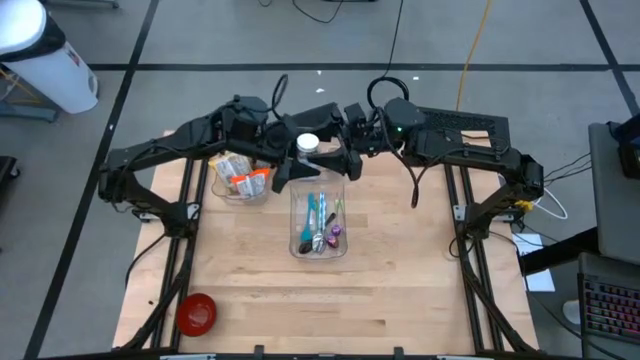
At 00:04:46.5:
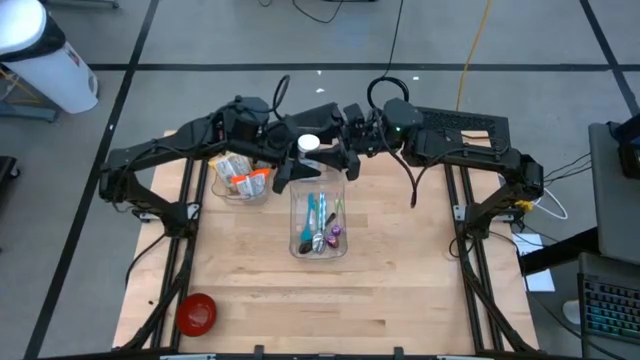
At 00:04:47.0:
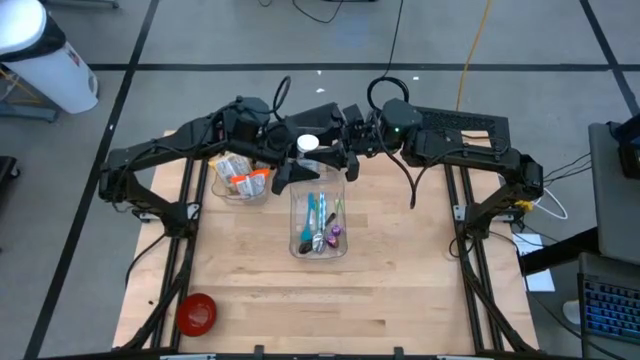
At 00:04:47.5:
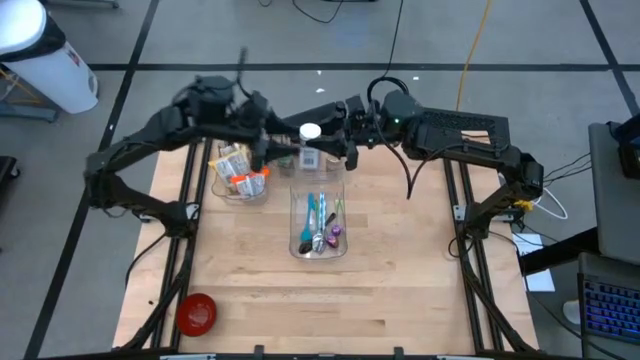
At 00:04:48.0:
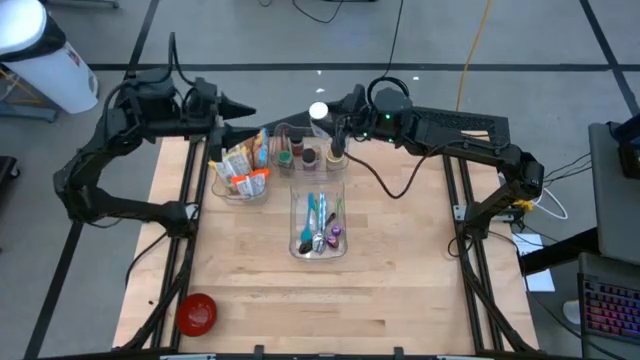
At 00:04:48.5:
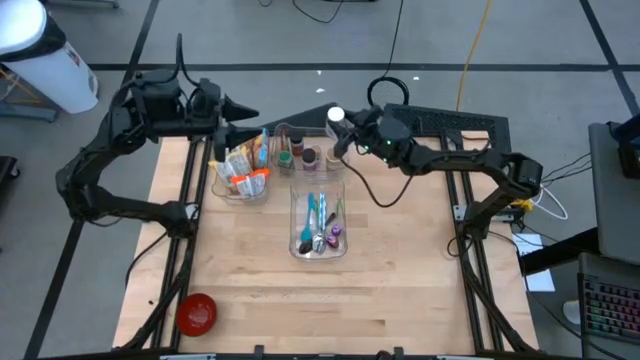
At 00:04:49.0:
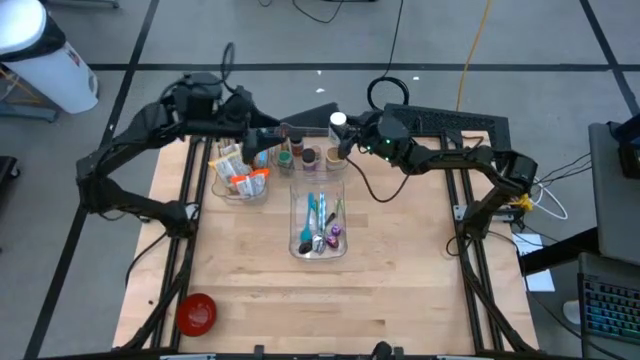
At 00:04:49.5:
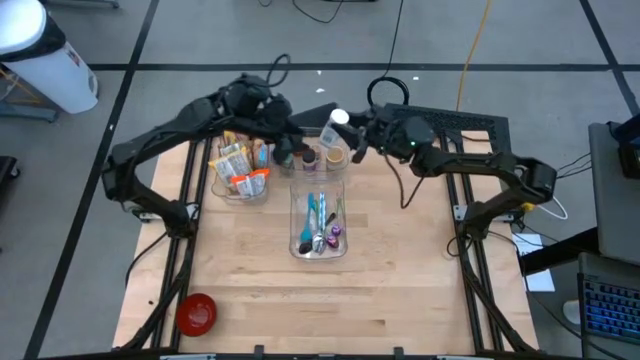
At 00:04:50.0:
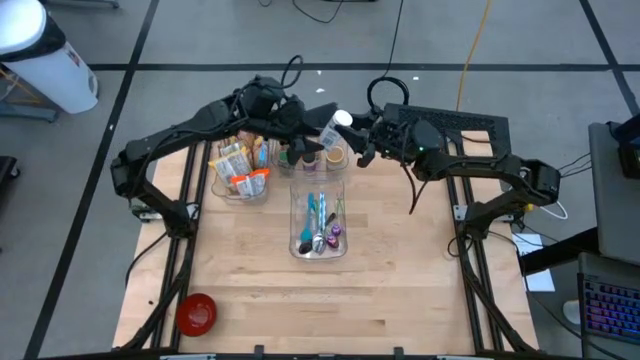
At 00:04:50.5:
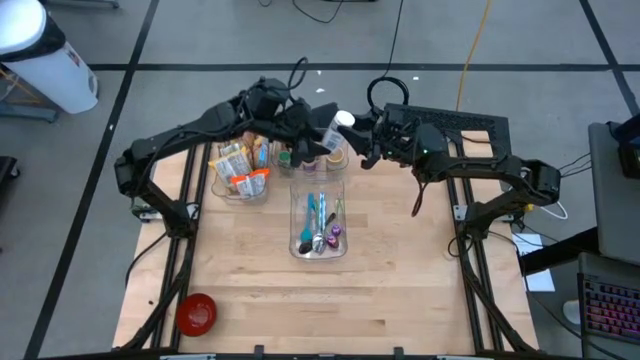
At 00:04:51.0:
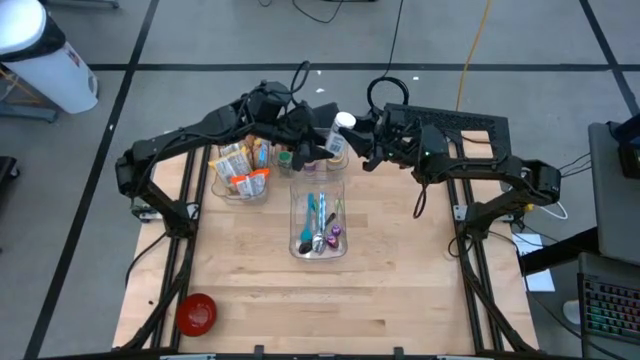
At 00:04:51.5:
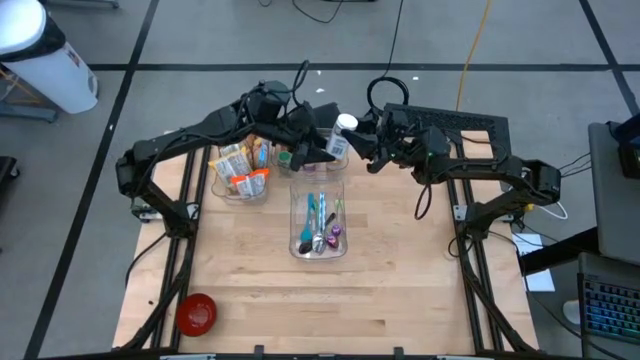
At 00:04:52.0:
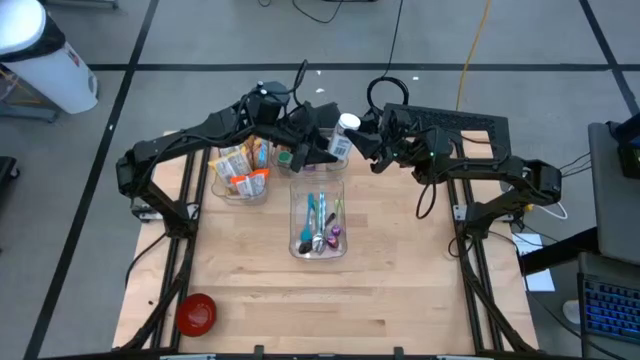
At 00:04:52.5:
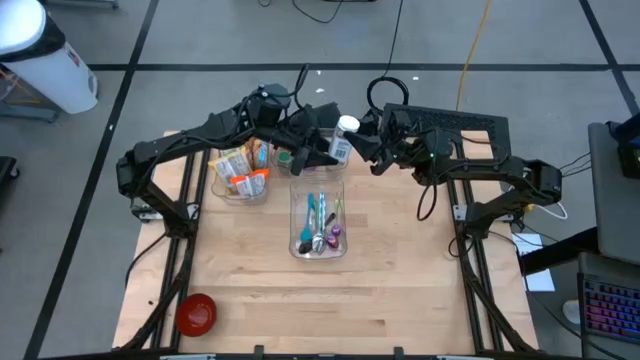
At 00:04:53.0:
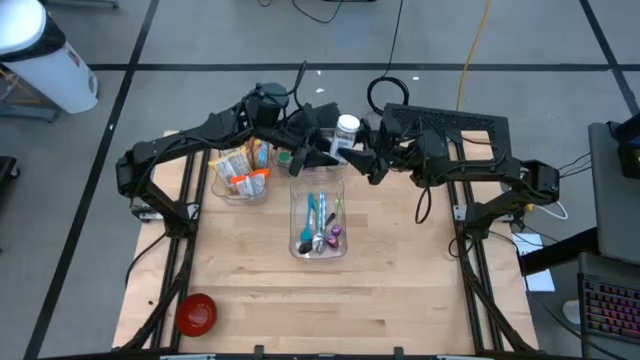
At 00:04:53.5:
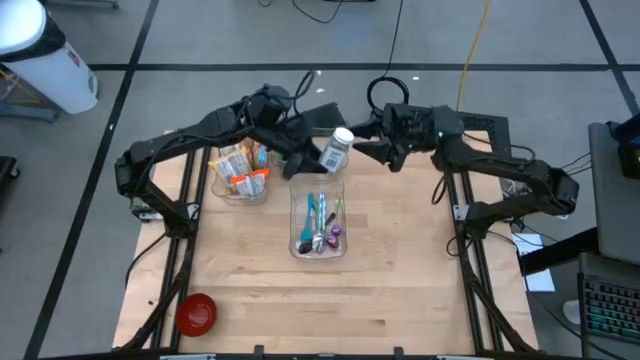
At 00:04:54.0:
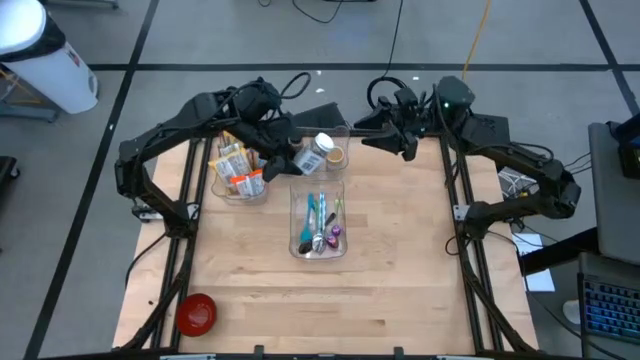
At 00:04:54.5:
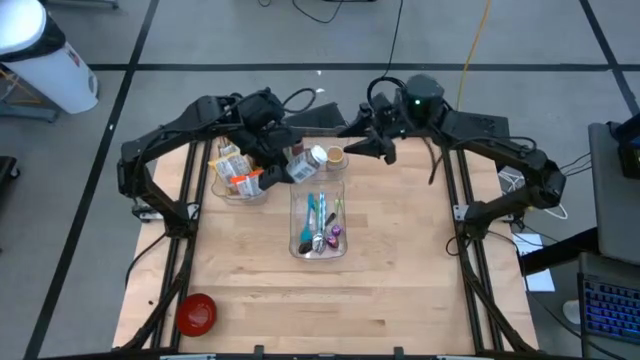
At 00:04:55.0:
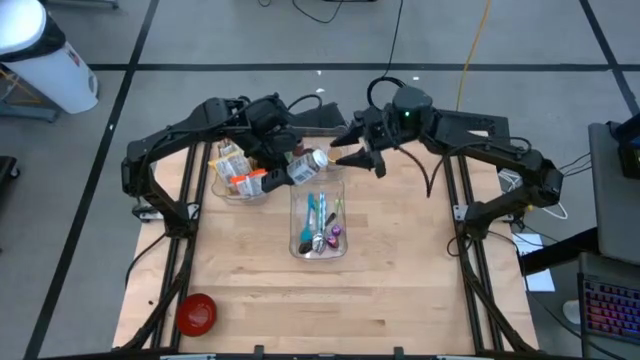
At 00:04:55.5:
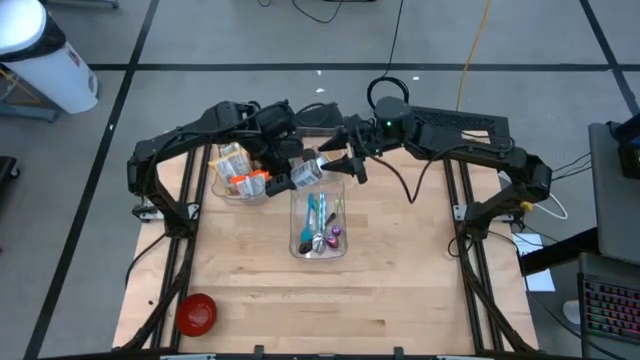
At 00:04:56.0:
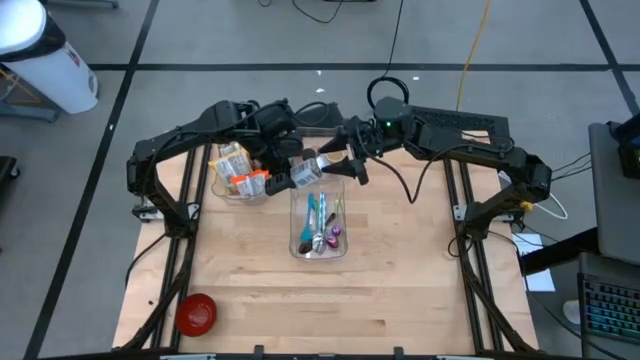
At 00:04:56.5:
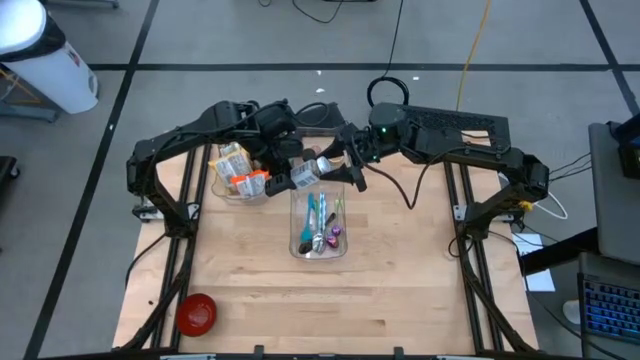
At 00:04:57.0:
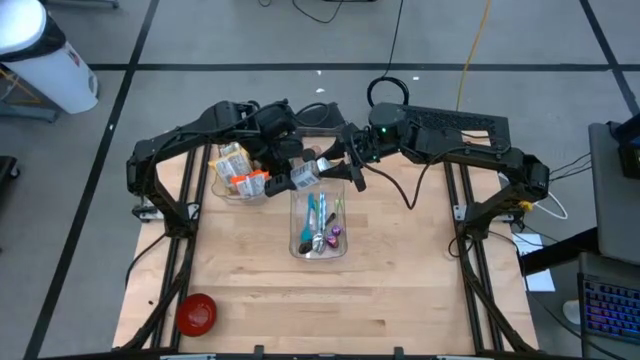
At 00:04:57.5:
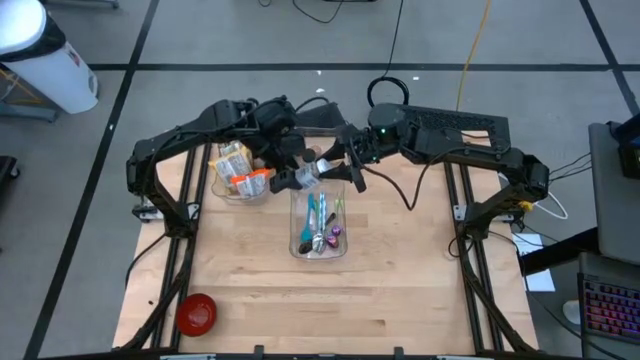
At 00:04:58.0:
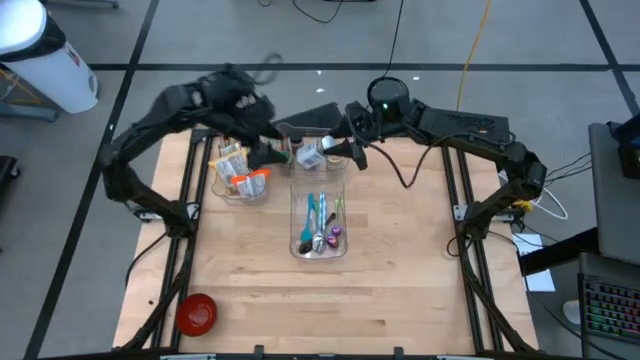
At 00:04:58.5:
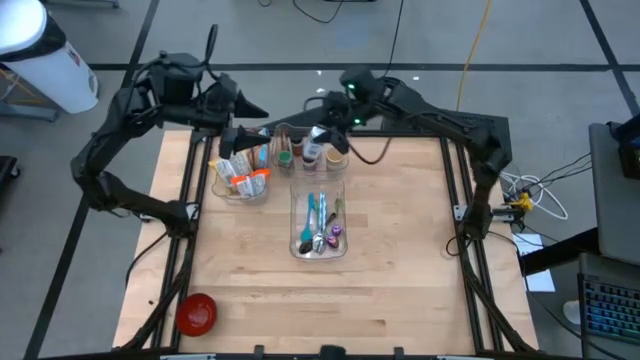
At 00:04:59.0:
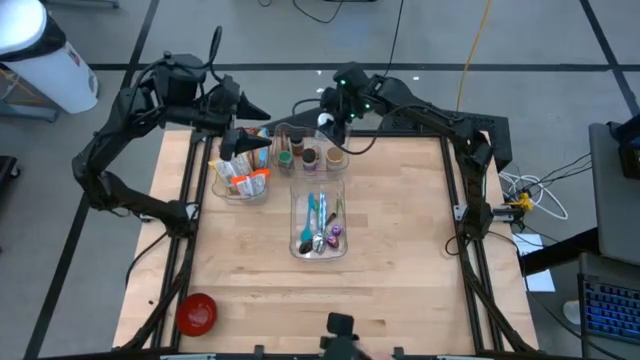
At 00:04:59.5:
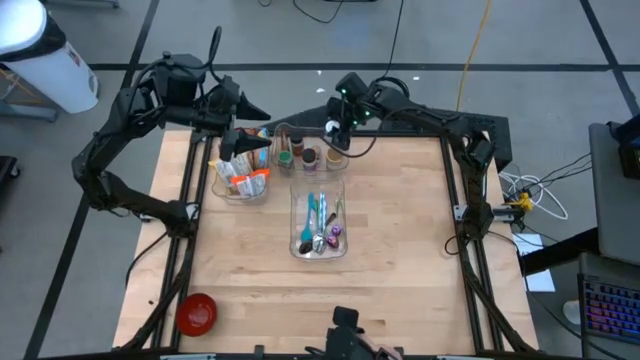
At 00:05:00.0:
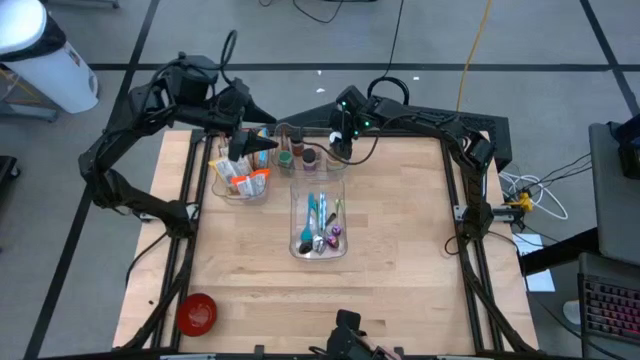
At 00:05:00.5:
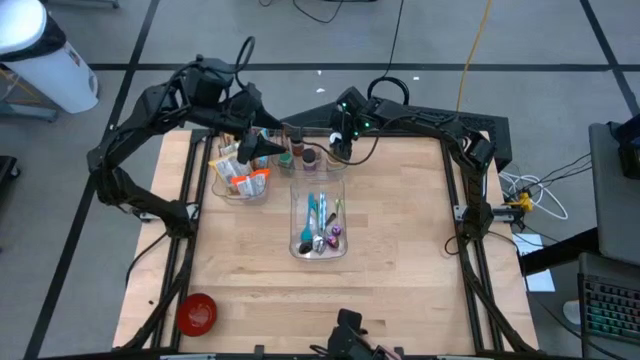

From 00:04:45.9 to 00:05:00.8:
Task: Pick & Place Food Item
Put the white seasoning bottle into the top right transparent bin

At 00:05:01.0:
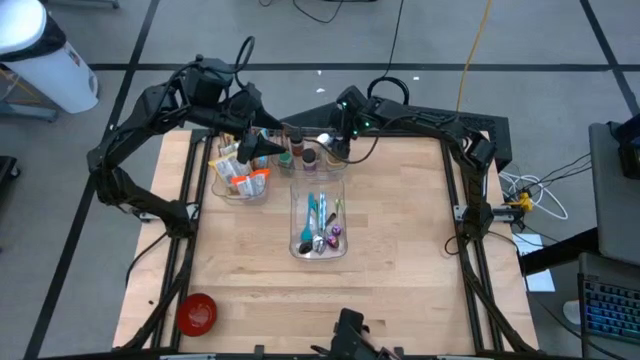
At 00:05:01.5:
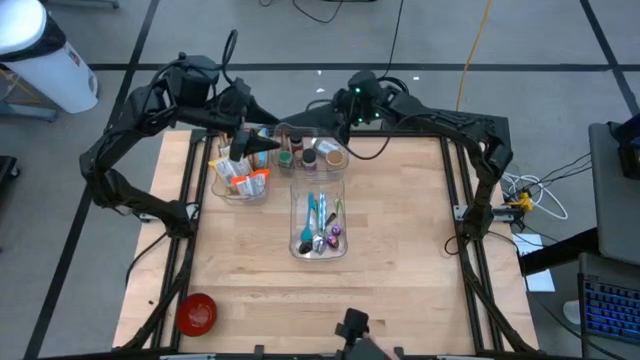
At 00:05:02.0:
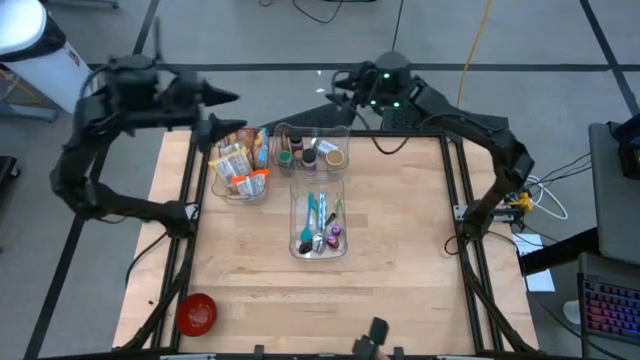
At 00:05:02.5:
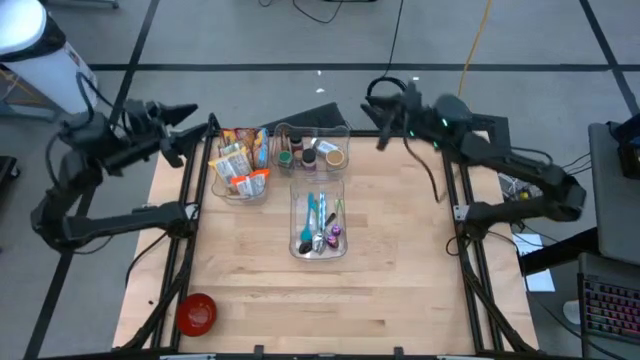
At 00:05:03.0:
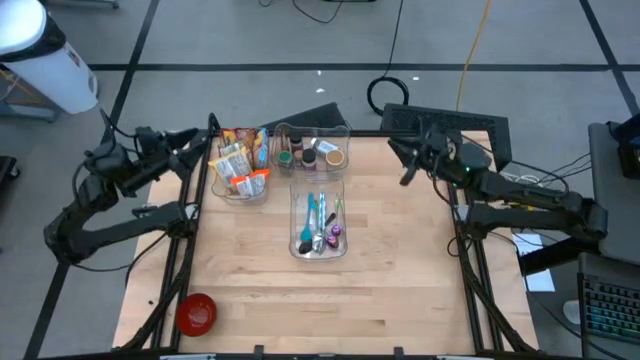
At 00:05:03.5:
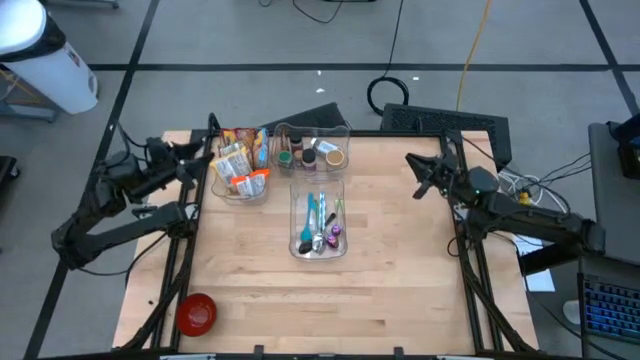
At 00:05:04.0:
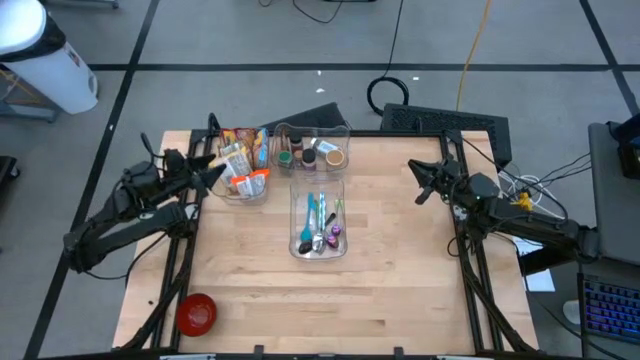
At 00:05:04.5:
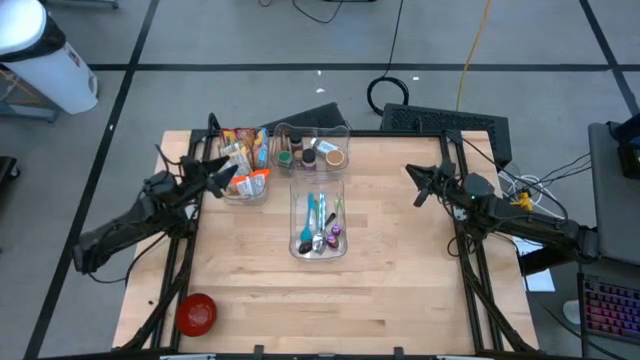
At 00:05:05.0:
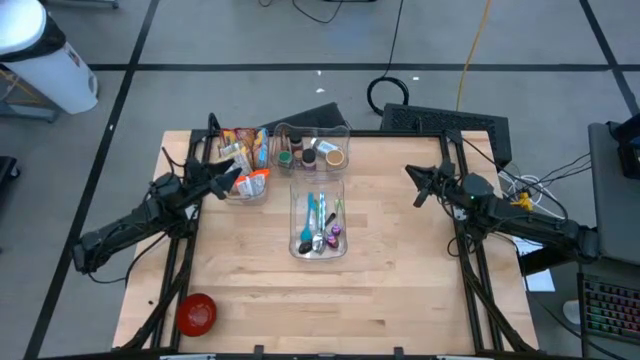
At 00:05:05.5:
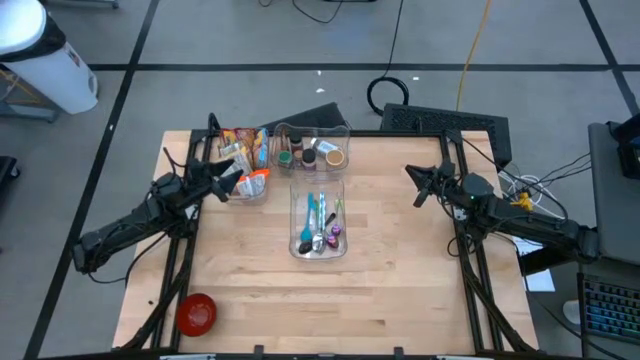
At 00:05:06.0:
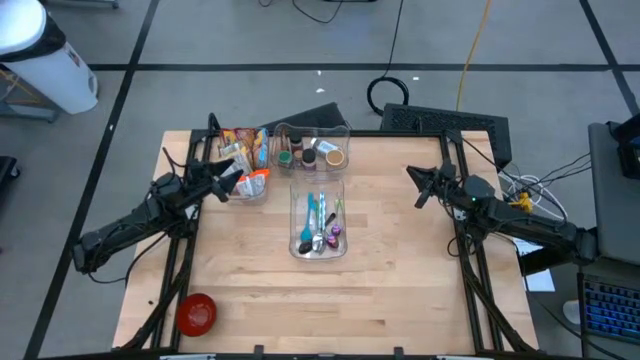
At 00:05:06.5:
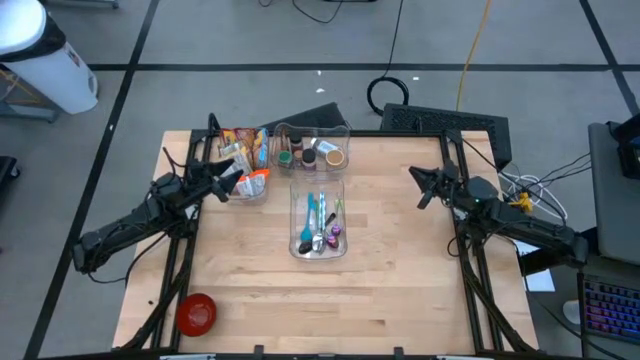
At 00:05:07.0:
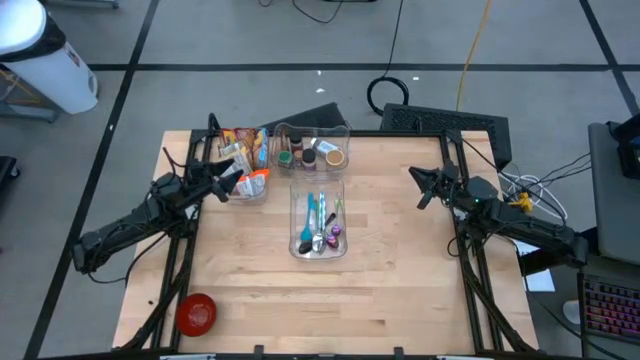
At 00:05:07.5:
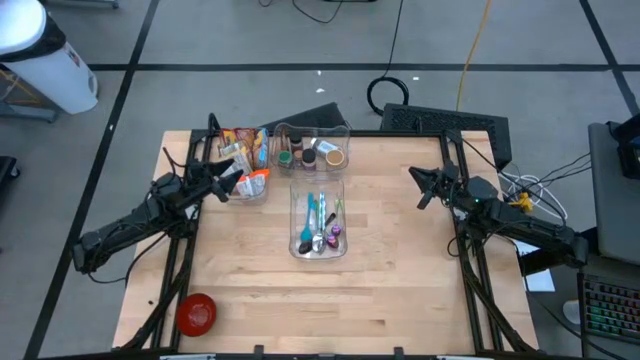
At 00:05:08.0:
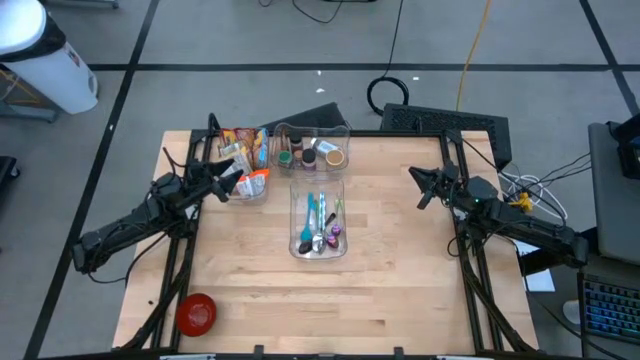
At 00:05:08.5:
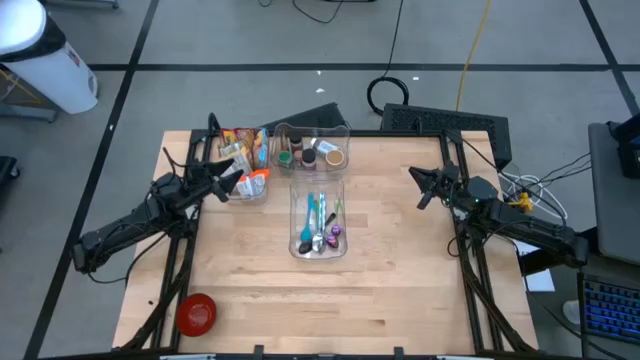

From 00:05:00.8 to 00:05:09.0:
Return to Home Position
